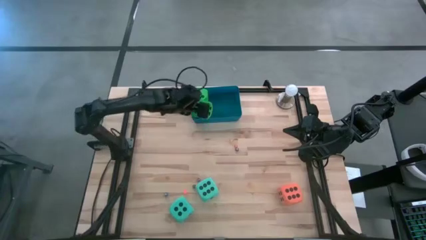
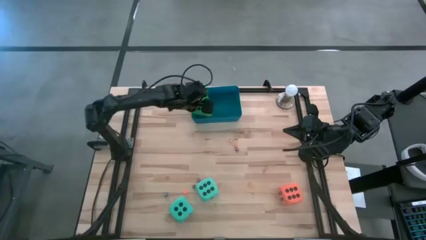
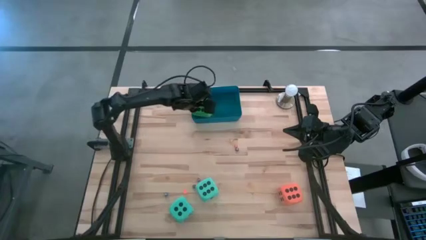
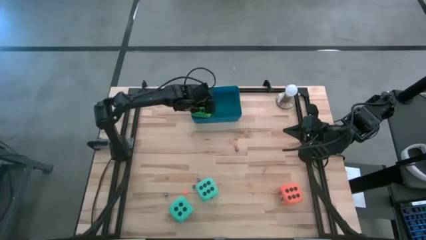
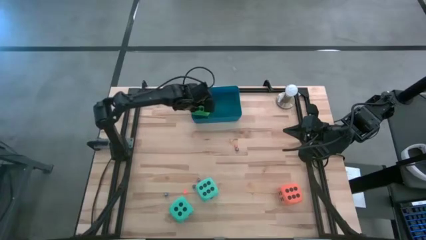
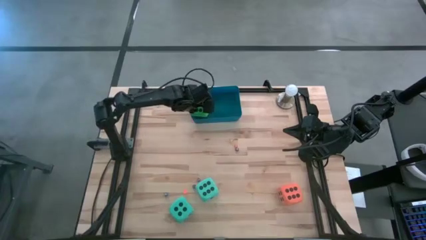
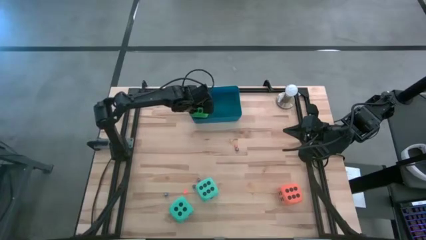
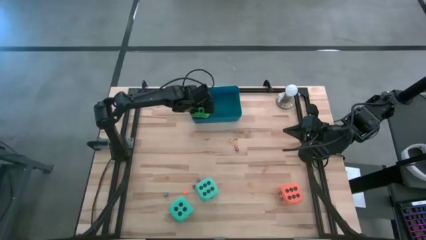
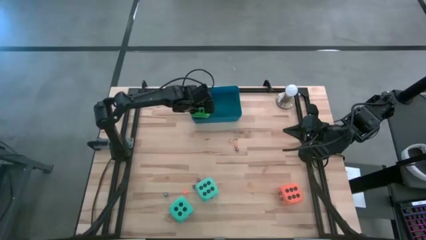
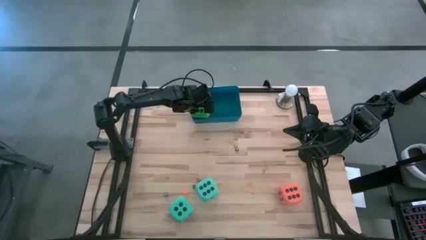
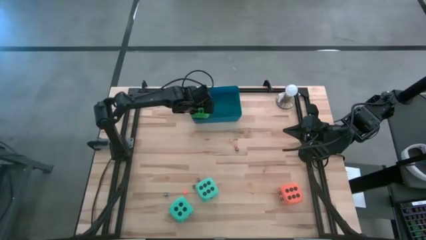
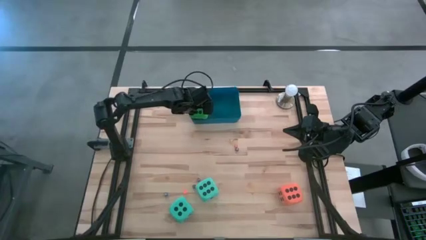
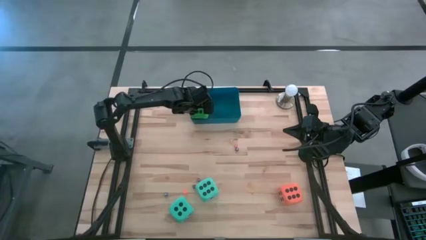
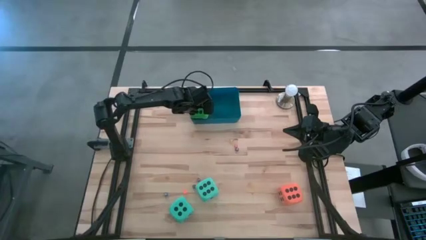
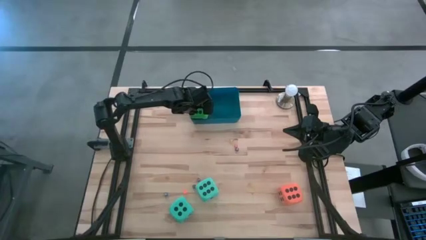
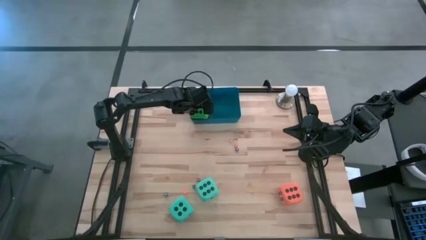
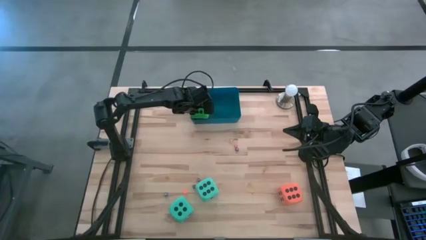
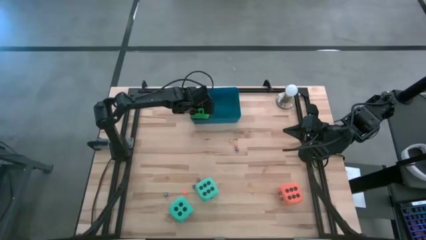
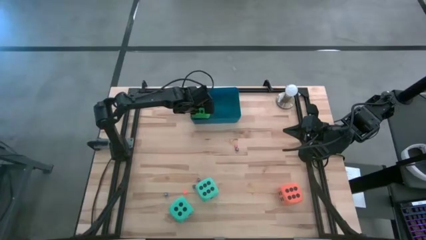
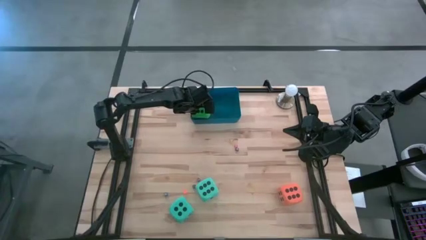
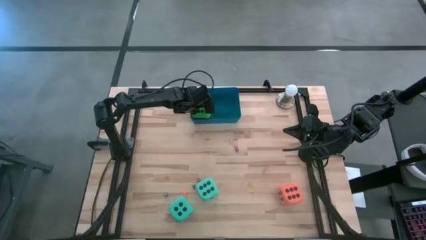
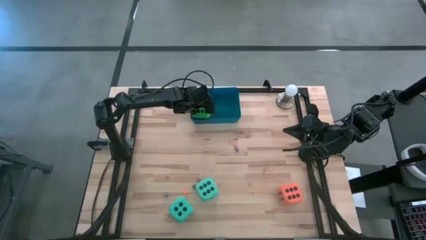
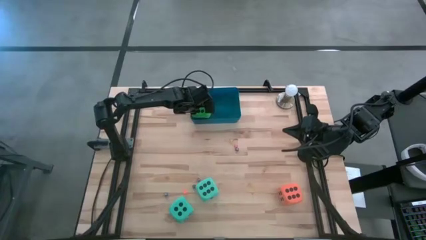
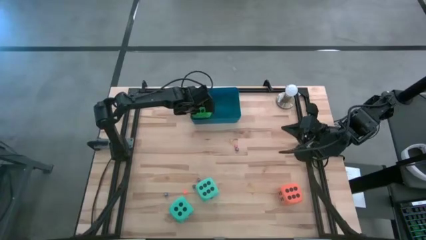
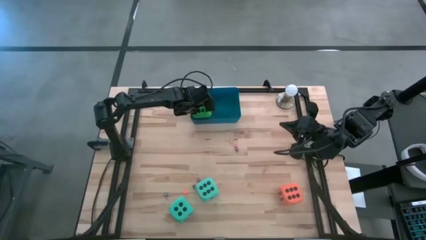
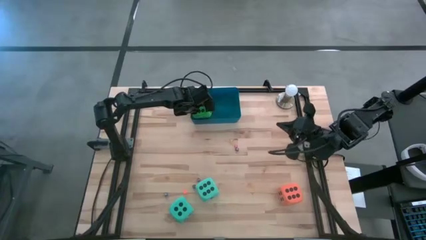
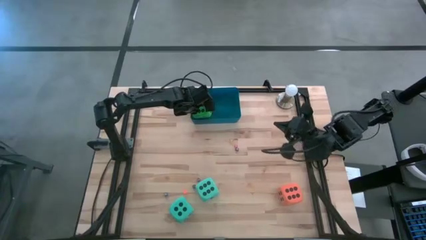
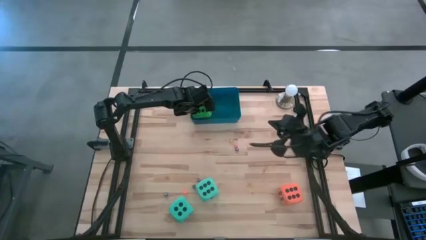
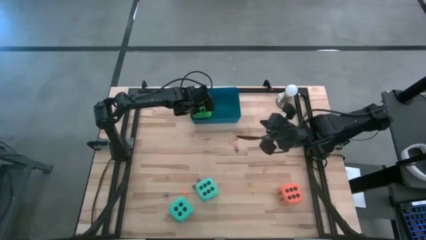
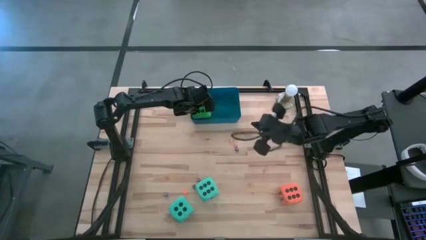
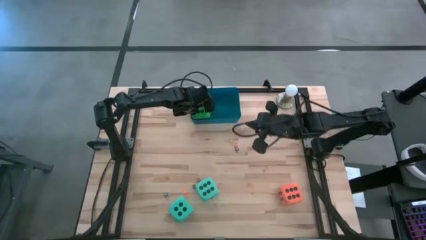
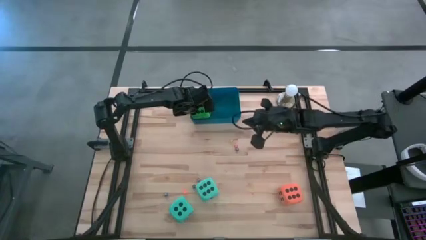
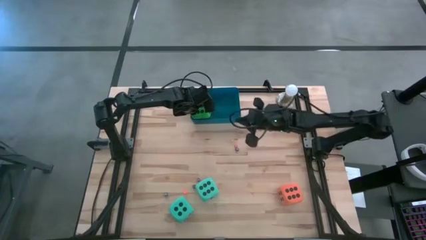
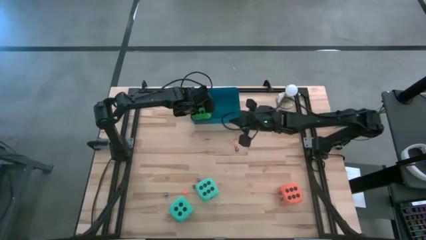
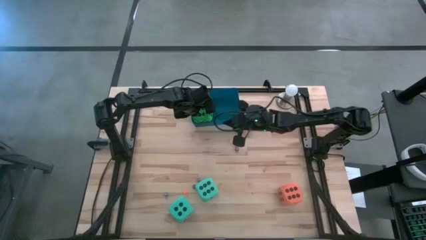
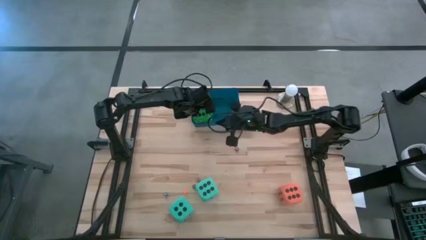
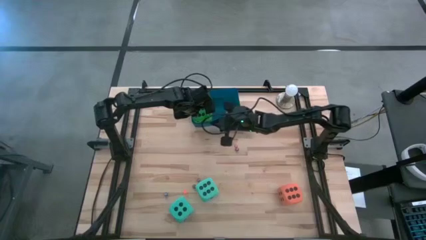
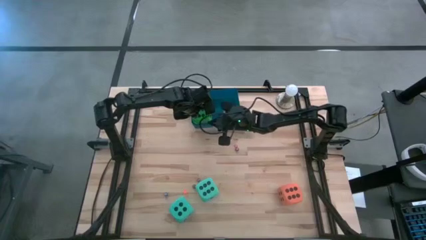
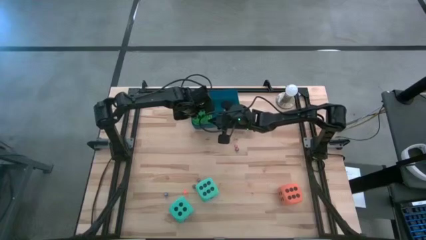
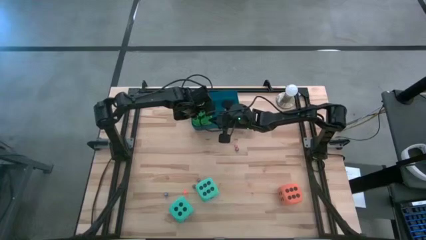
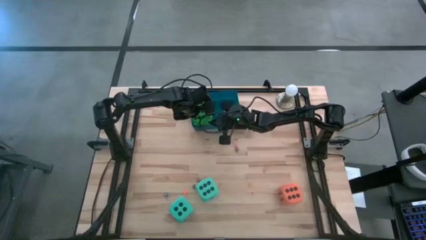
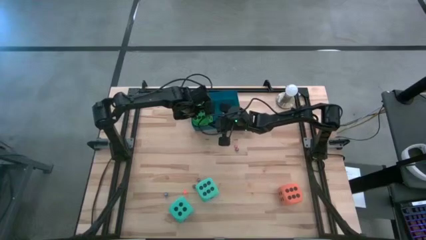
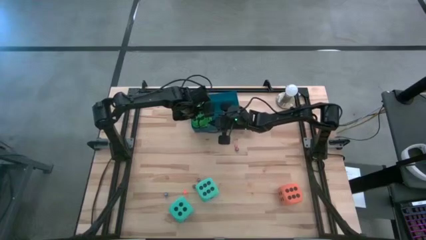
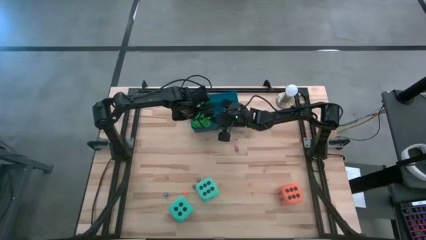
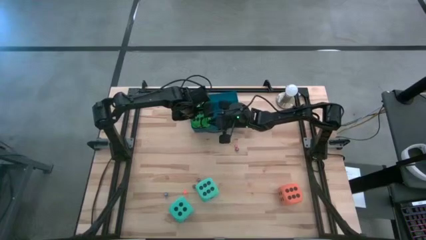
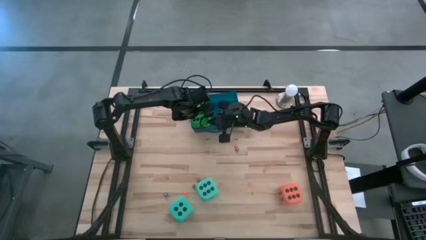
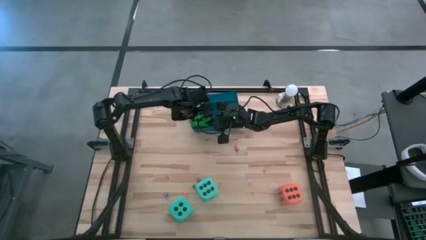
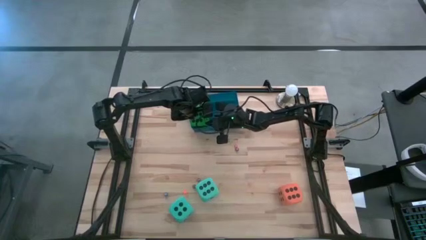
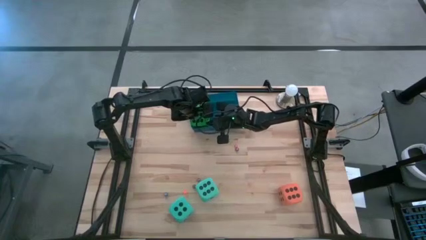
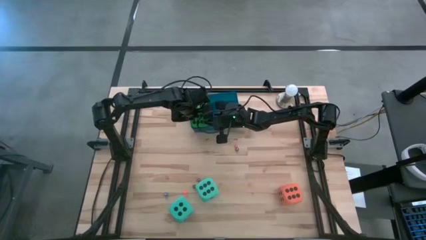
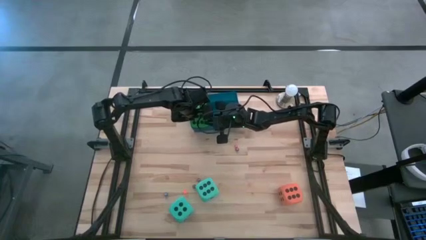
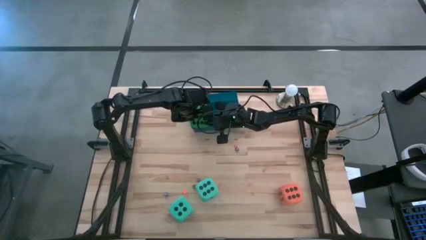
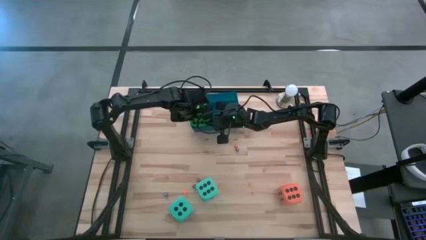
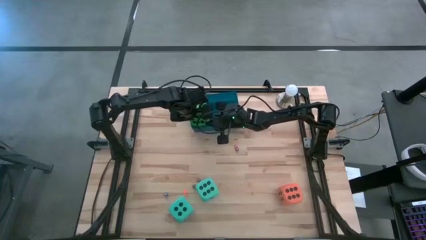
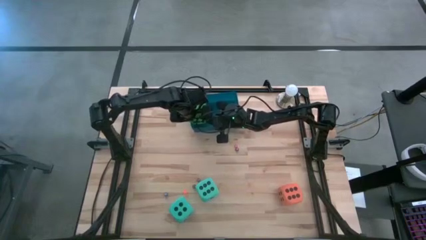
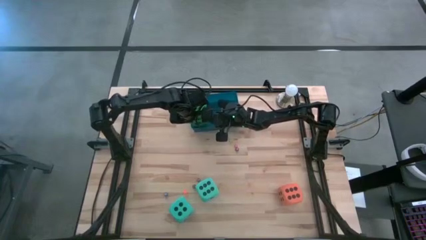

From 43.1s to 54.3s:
Task: Pick & Place Dice
Put the large green dice into the blue bin
